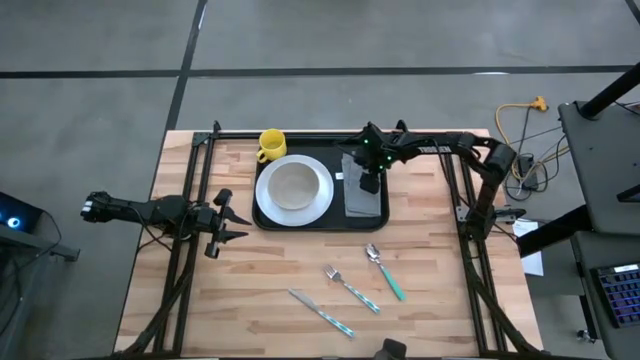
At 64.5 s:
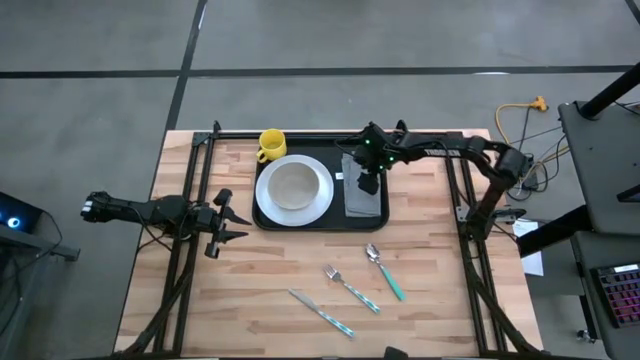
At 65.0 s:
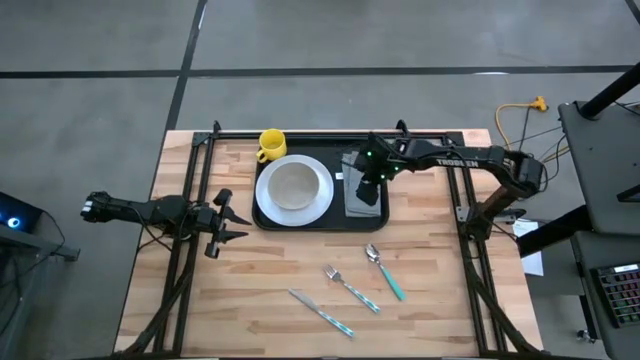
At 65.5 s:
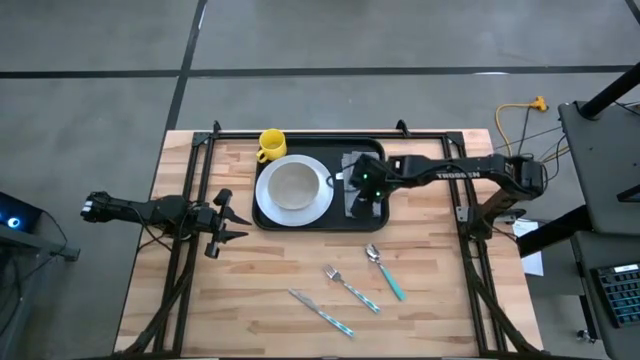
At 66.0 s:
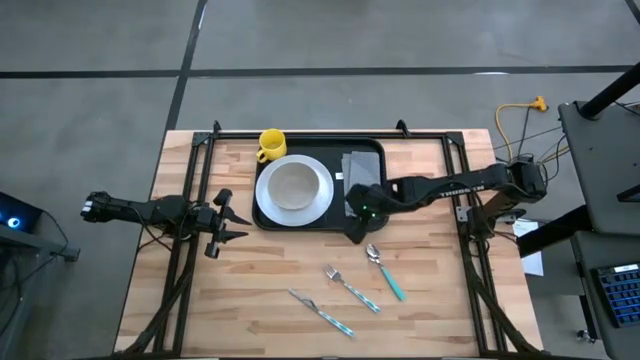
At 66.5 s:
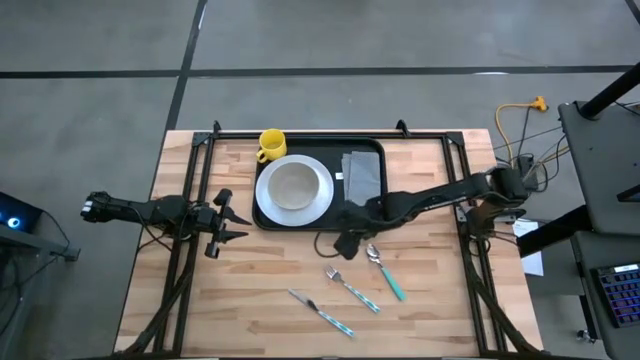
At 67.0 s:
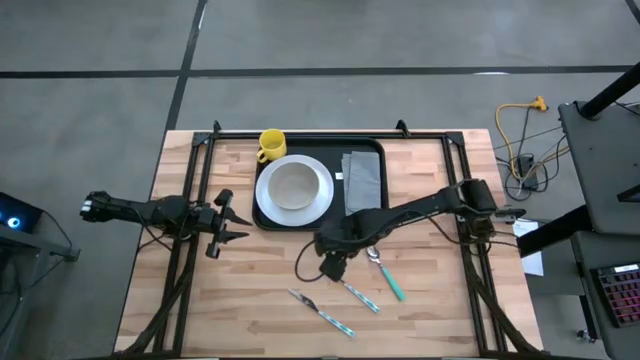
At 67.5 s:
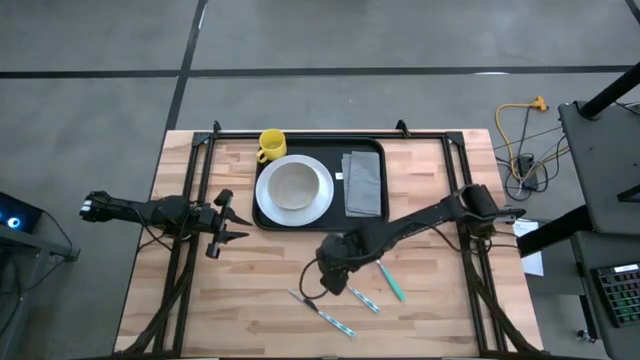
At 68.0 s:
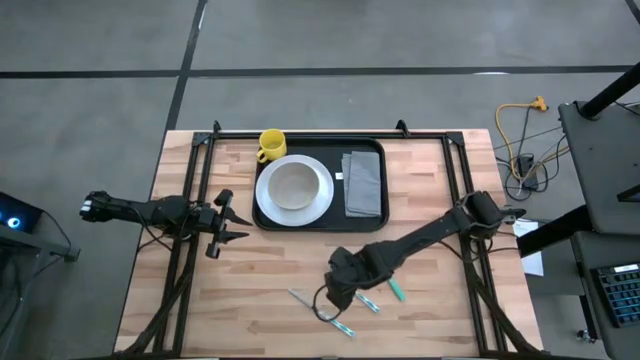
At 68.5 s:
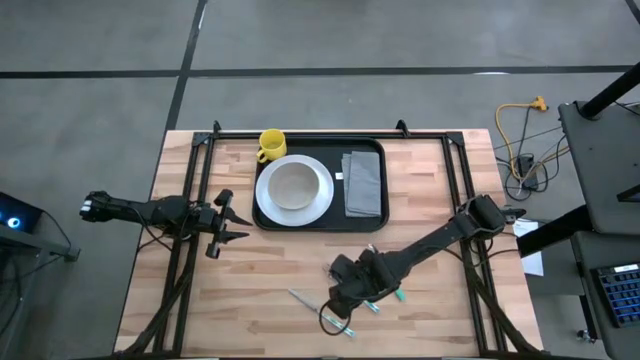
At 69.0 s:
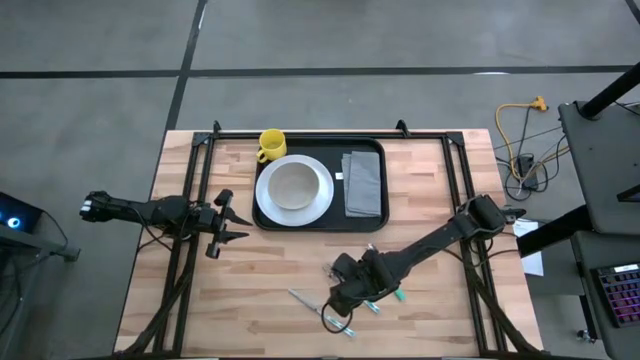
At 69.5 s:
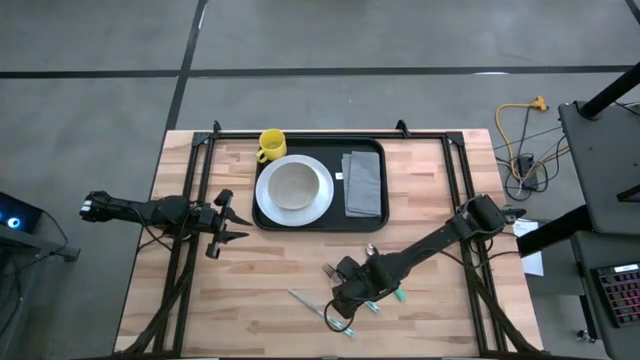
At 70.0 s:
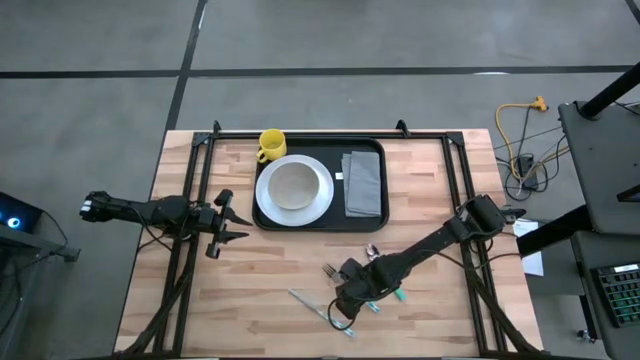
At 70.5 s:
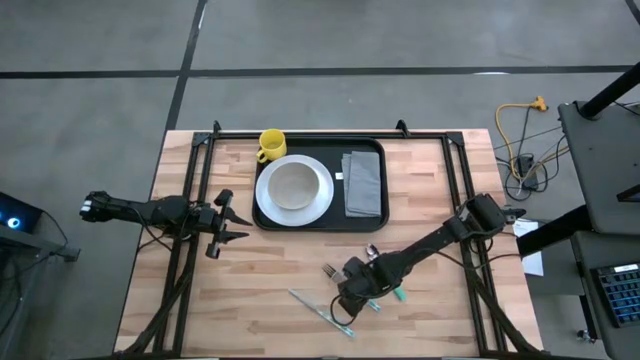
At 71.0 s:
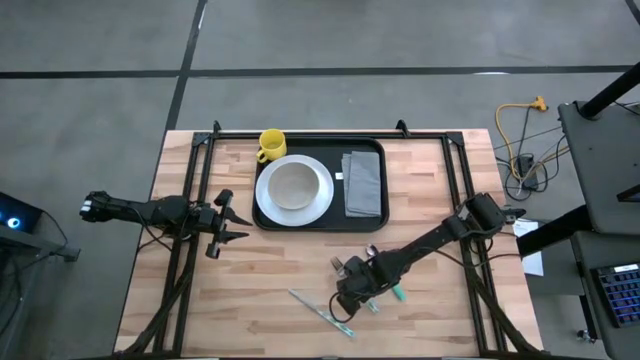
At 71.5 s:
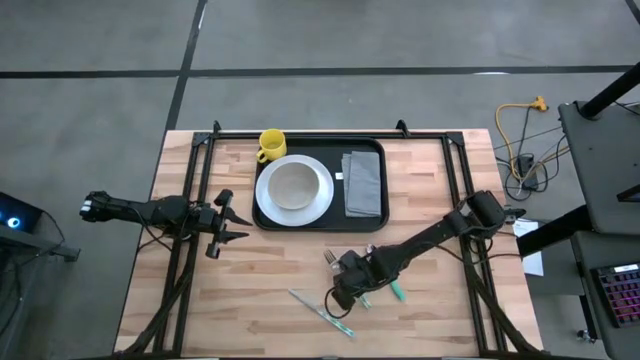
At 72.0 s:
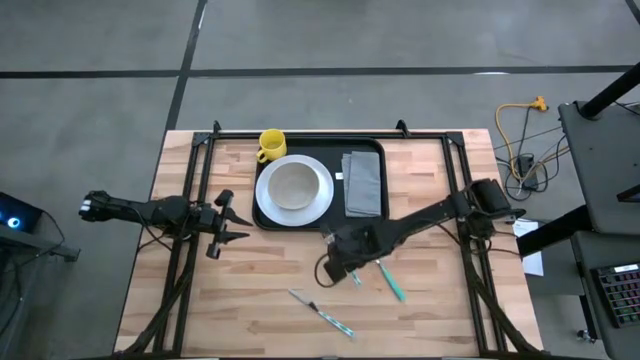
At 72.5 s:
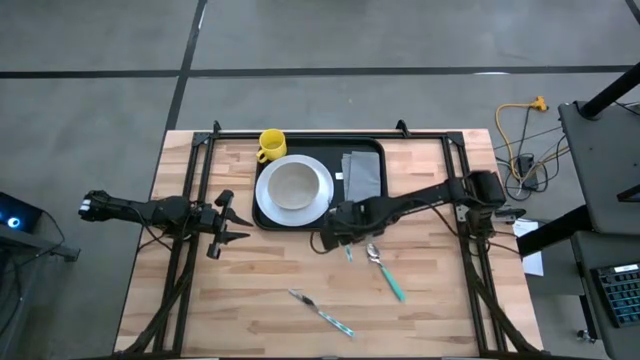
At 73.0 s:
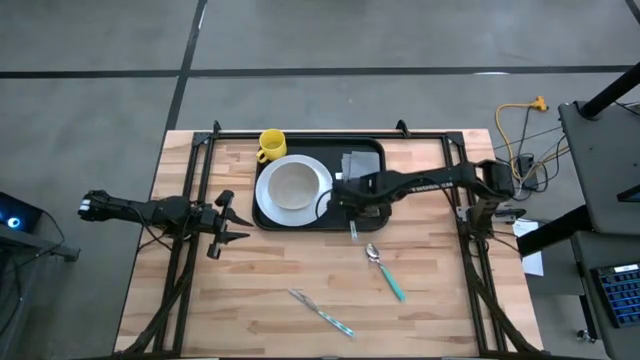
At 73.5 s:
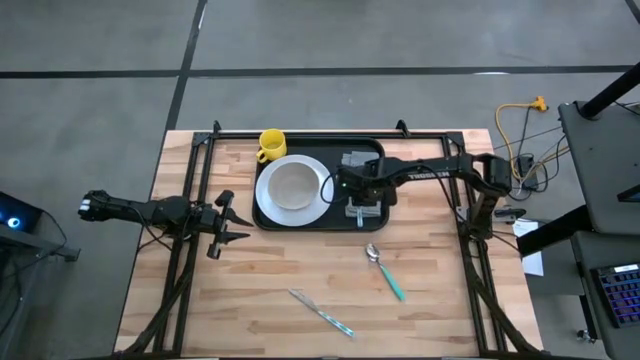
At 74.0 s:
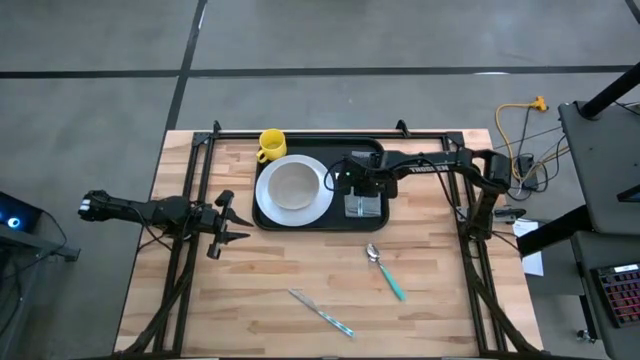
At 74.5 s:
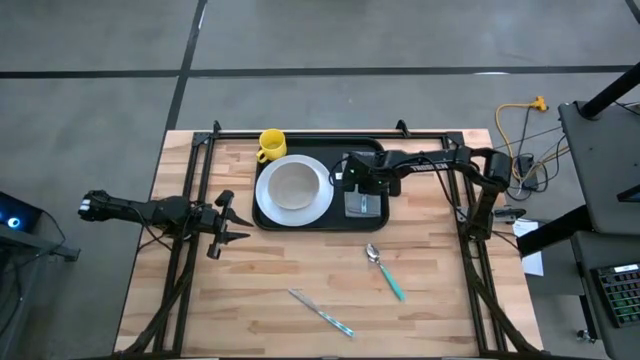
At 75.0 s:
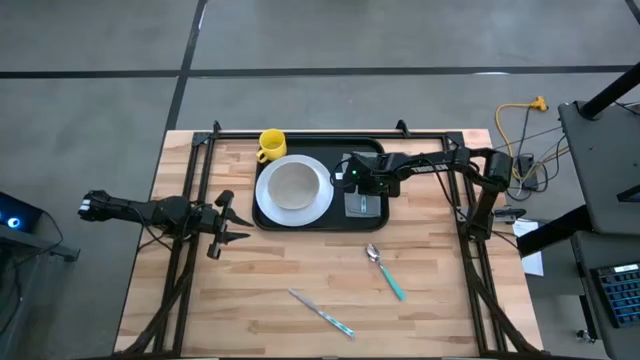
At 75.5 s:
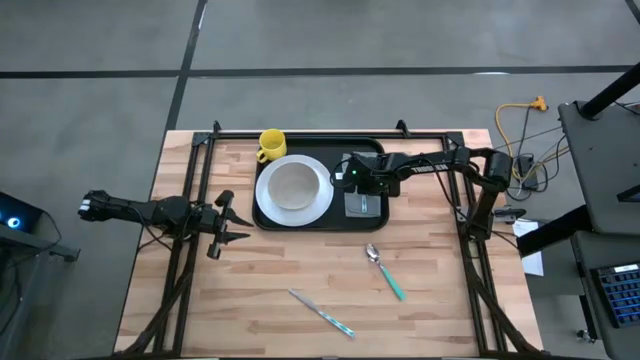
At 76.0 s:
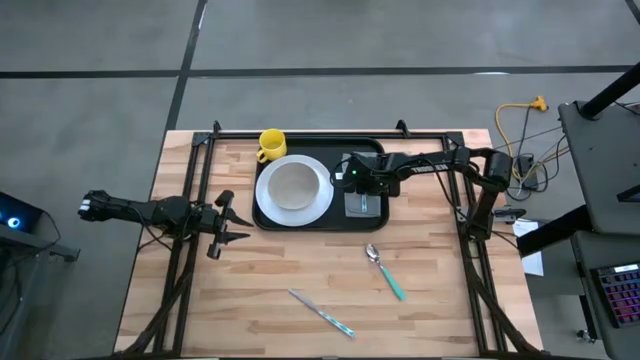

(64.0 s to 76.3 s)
Task: Set up tray
Put the white fork on top of the napkin

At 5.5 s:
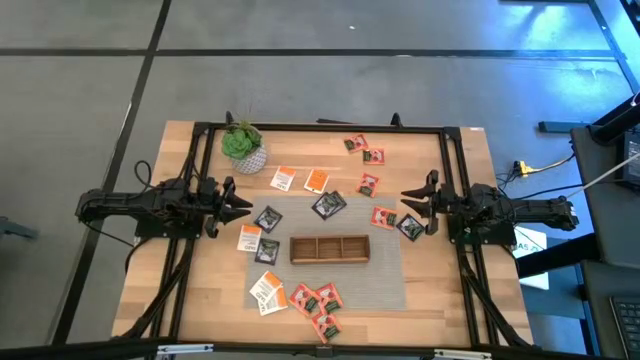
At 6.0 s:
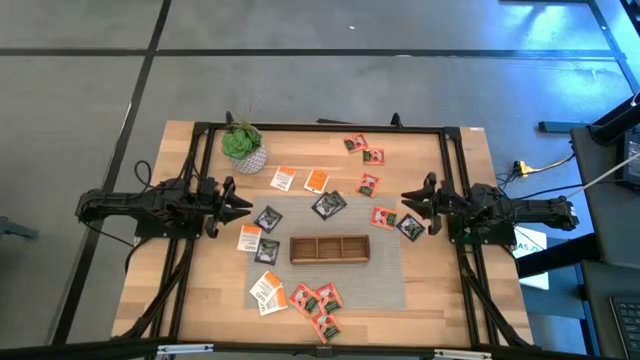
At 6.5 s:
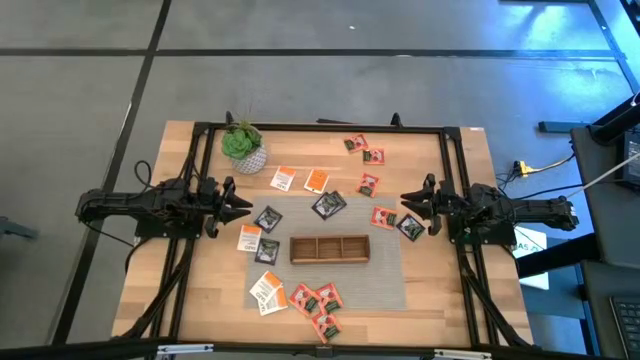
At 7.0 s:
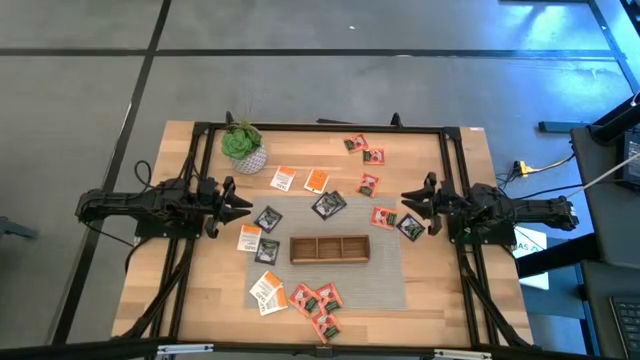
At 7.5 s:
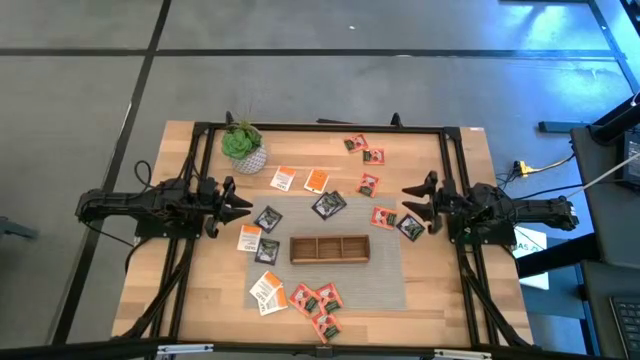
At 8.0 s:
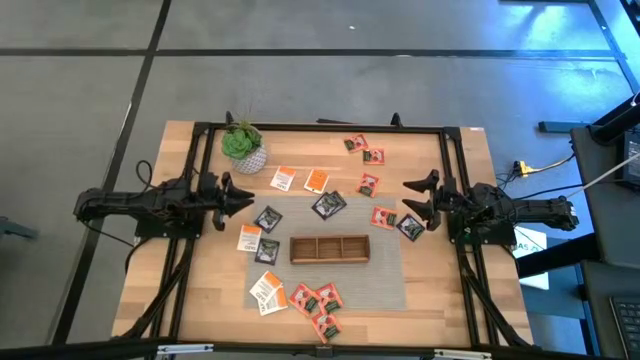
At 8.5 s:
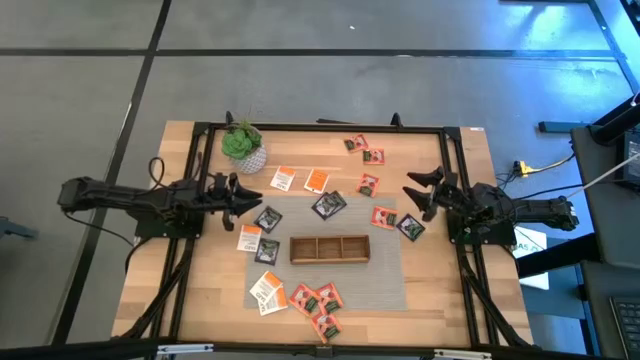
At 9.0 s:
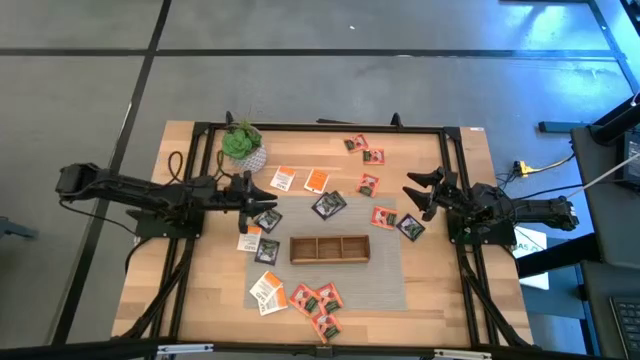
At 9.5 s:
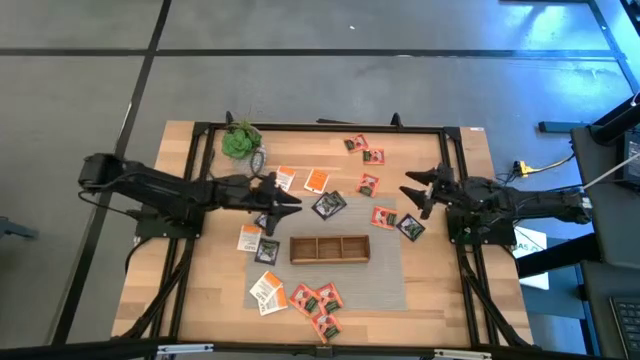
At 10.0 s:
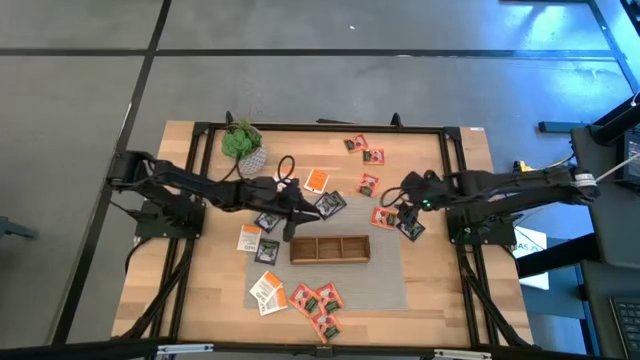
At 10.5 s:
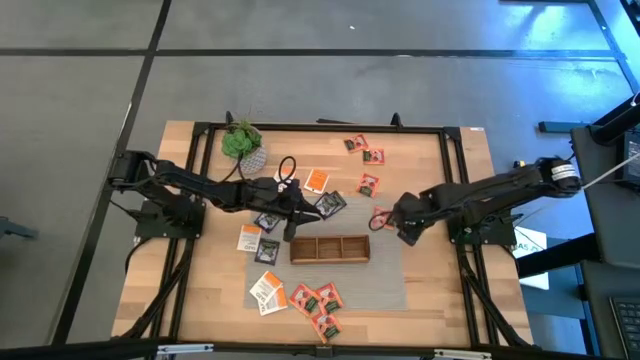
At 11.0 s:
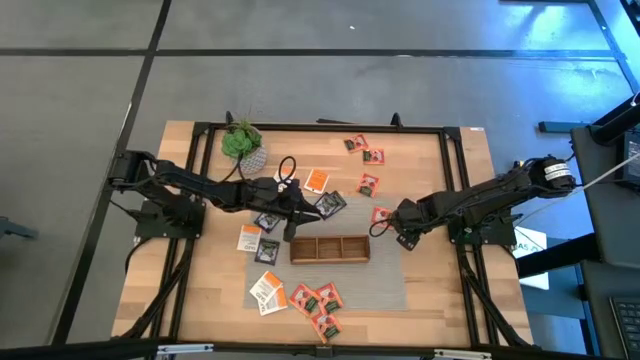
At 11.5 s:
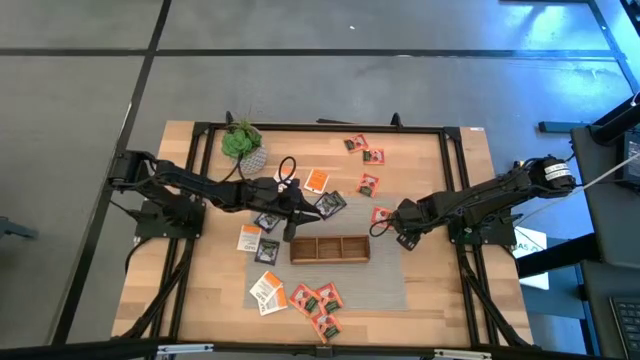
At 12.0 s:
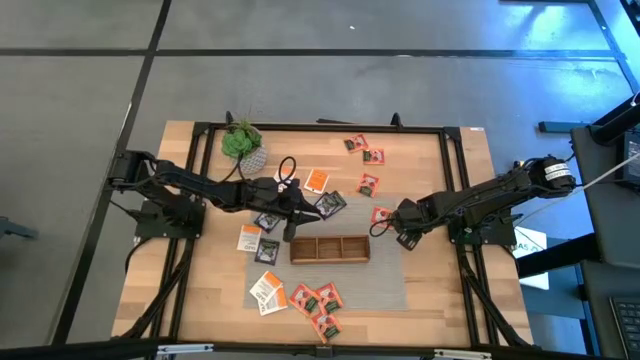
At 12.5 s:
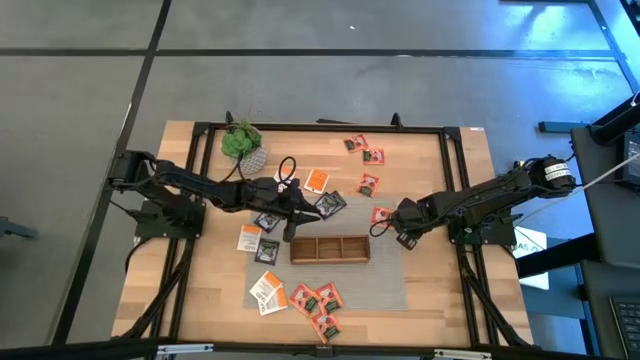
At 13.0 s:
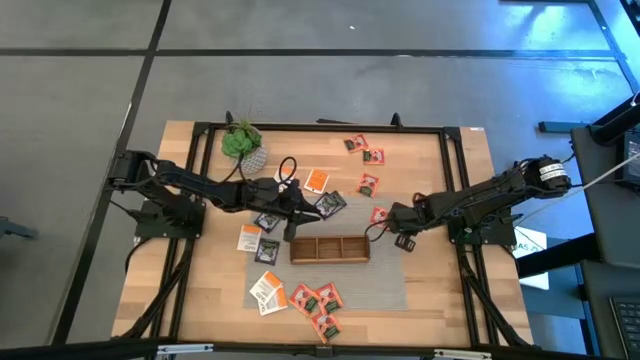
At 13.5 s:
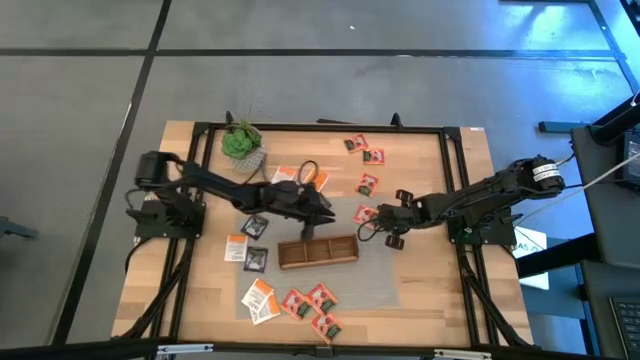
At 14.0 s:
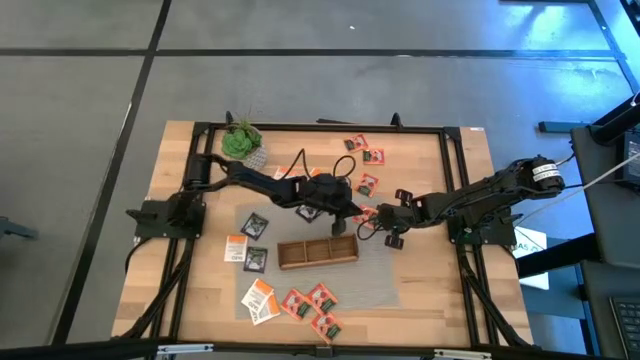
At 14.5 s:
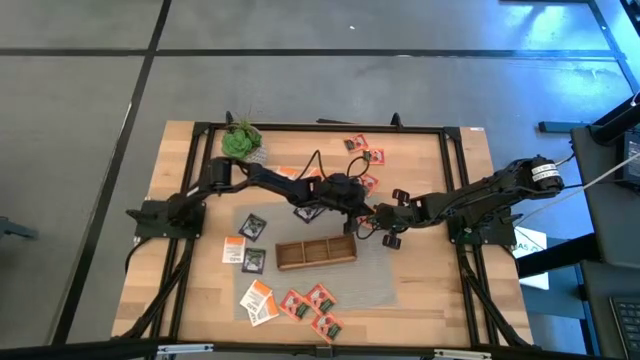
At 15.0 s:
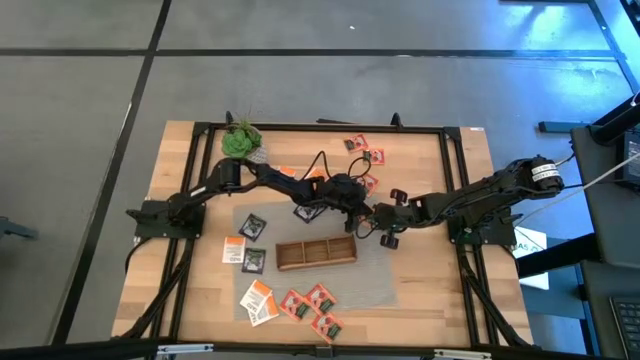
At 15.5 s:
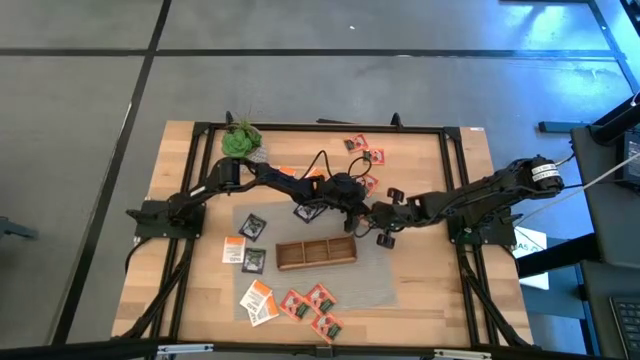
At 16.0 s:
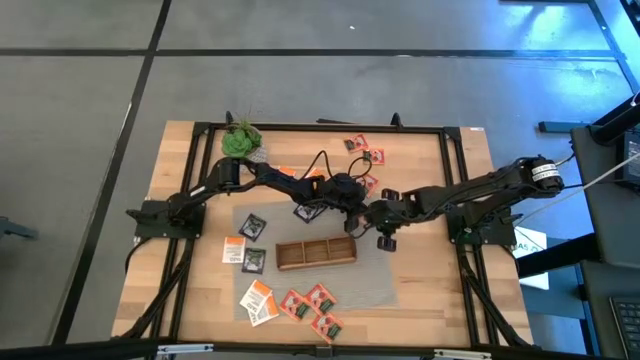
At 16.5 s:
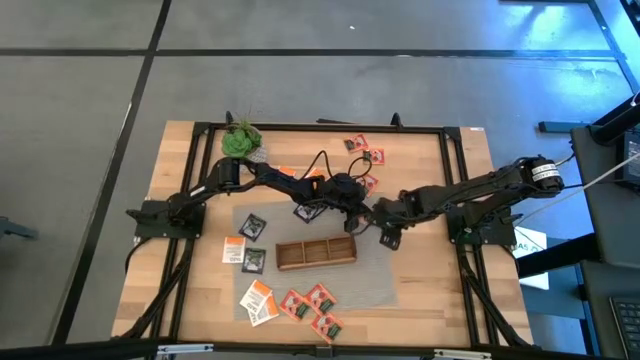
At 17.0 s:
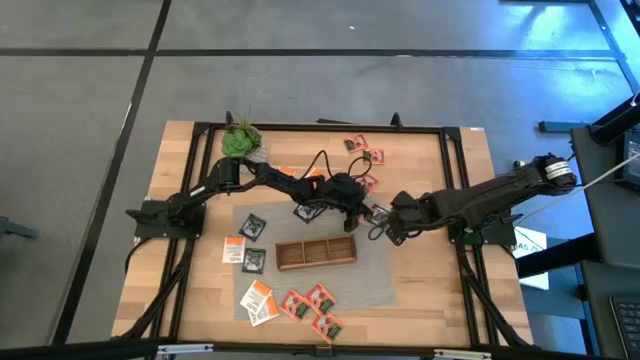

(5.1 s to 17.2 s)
Task: Pick & Place Tea
Put the purple tea bag into the right section of the wooden organizer
